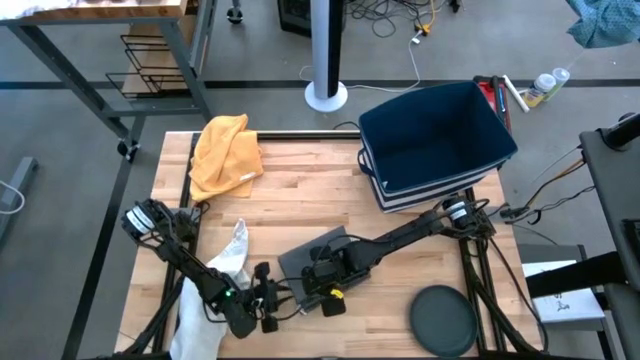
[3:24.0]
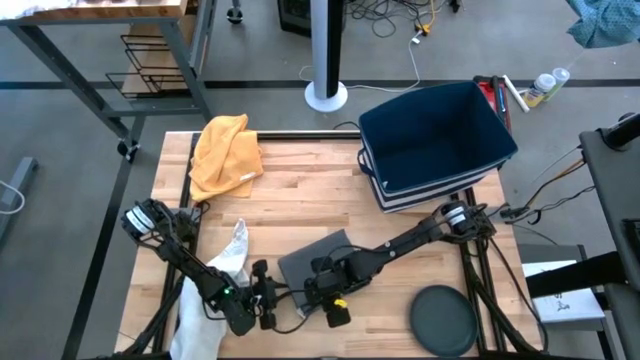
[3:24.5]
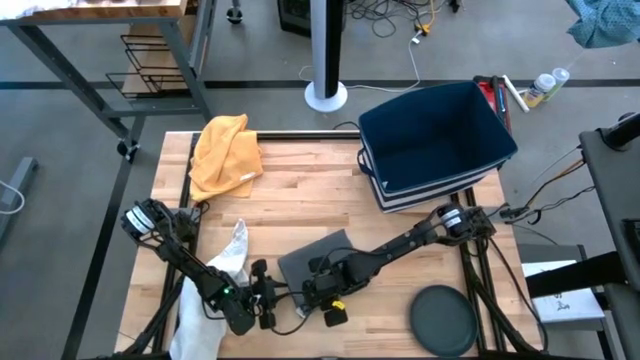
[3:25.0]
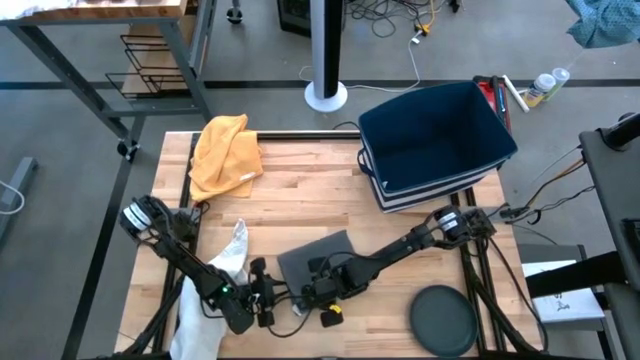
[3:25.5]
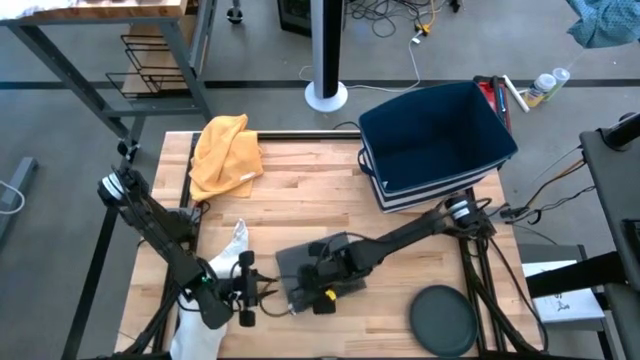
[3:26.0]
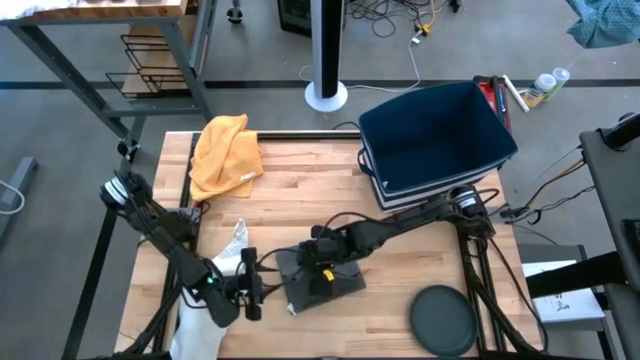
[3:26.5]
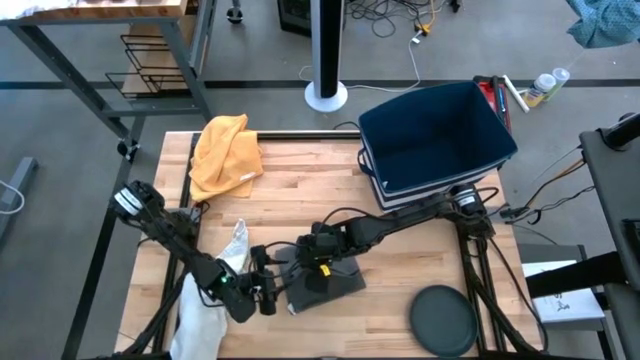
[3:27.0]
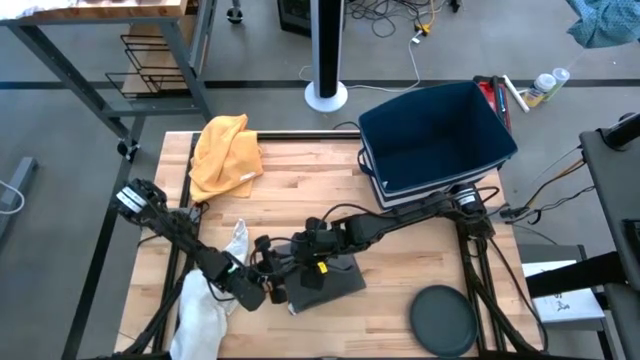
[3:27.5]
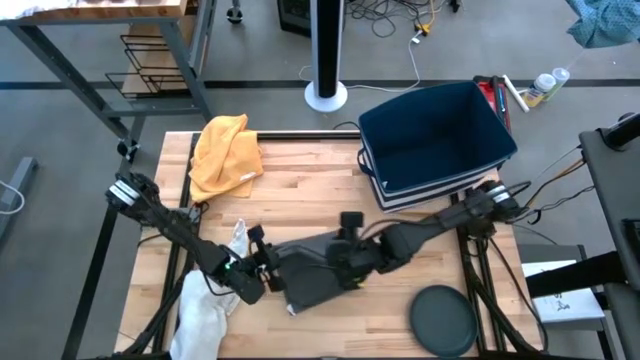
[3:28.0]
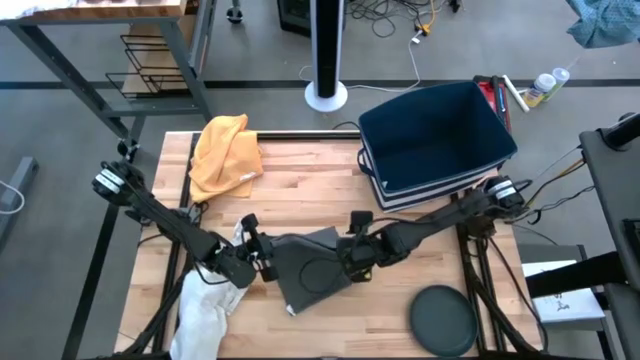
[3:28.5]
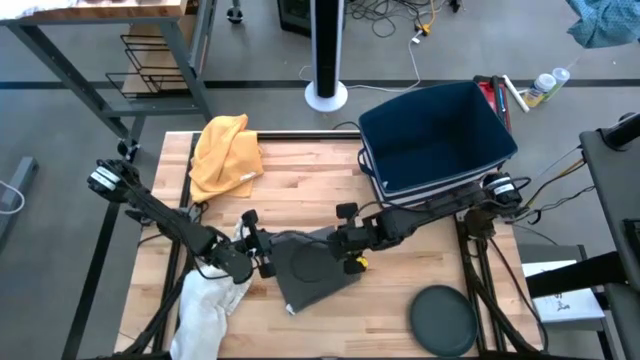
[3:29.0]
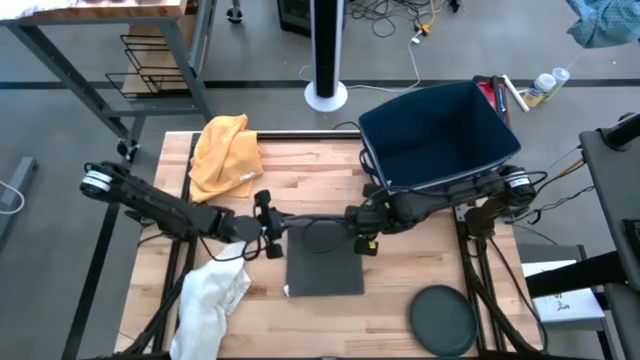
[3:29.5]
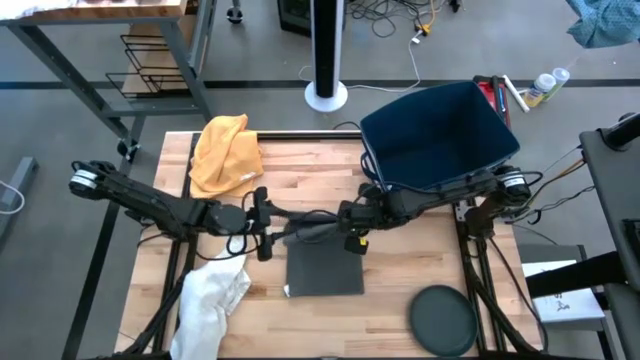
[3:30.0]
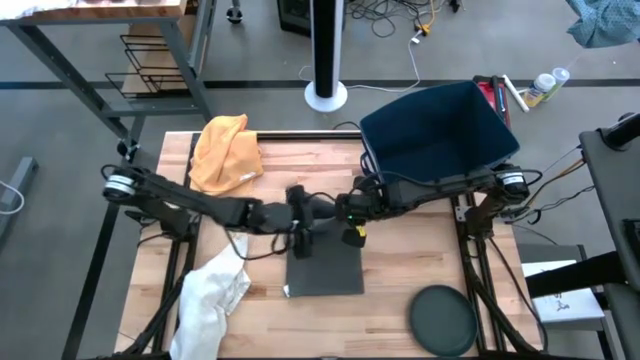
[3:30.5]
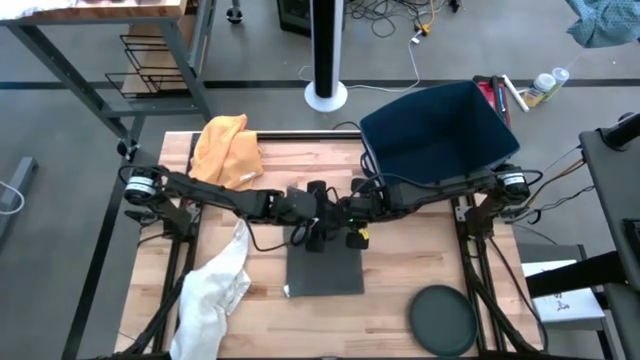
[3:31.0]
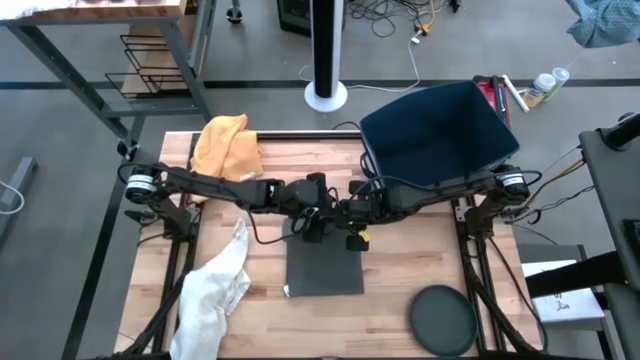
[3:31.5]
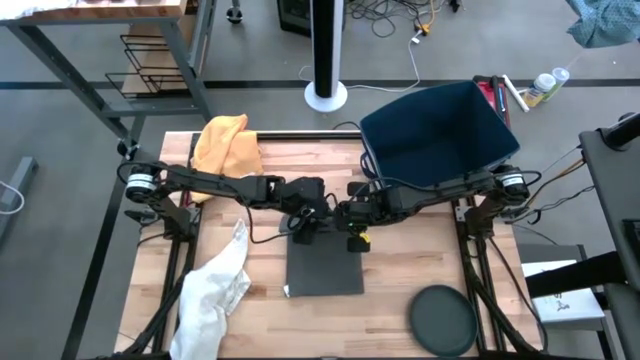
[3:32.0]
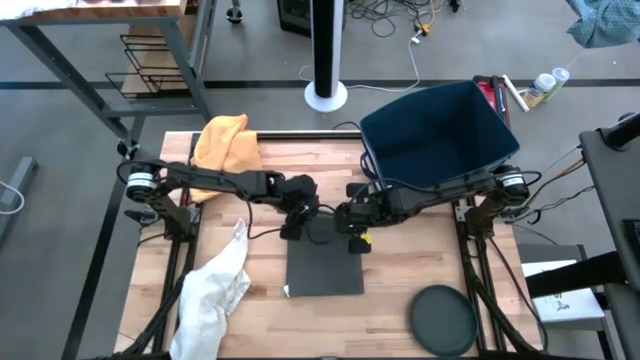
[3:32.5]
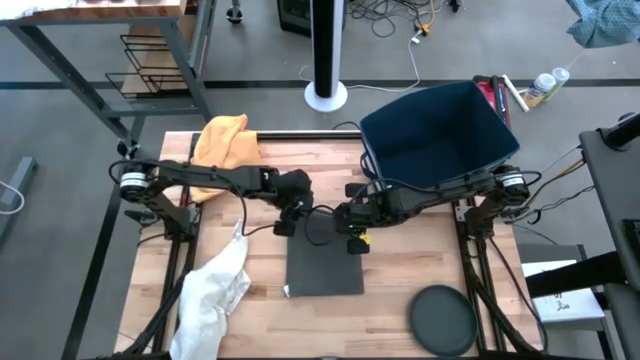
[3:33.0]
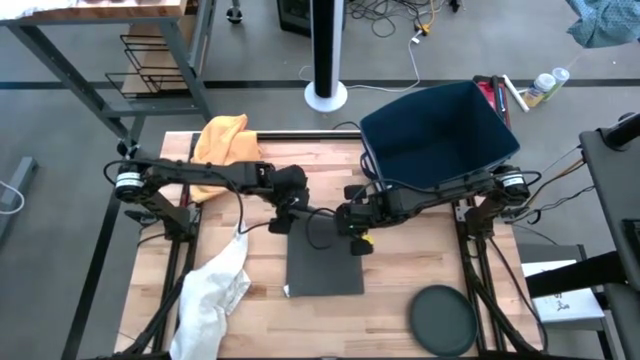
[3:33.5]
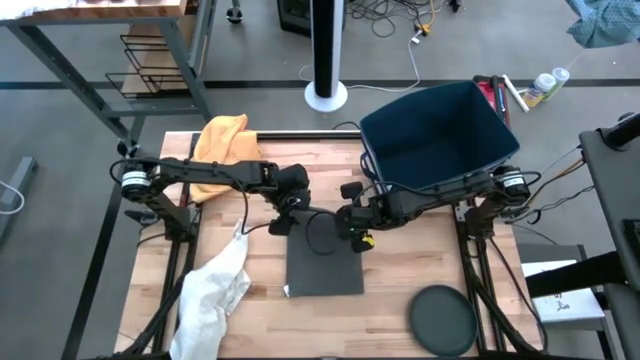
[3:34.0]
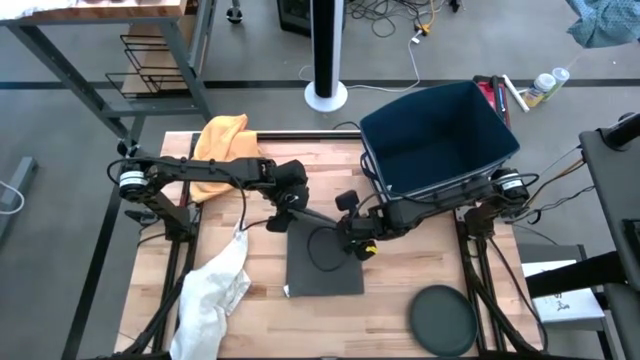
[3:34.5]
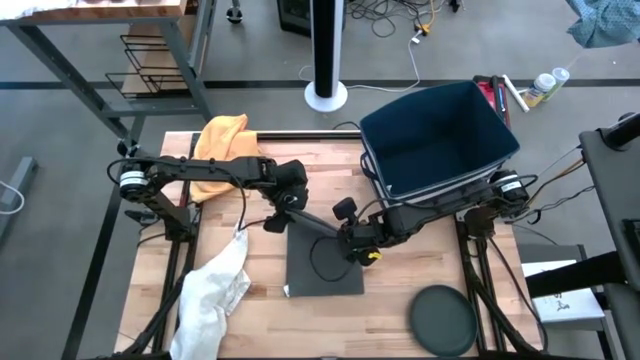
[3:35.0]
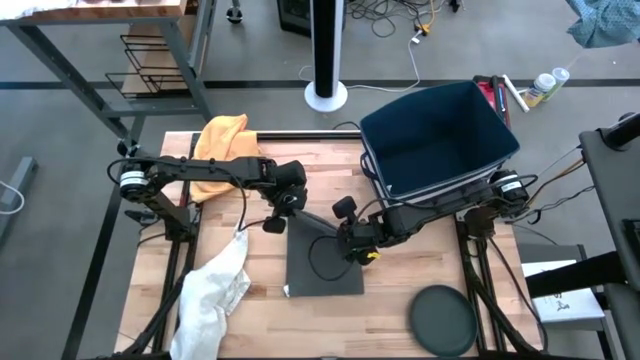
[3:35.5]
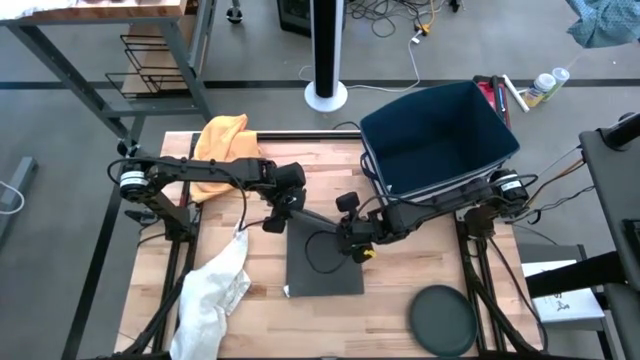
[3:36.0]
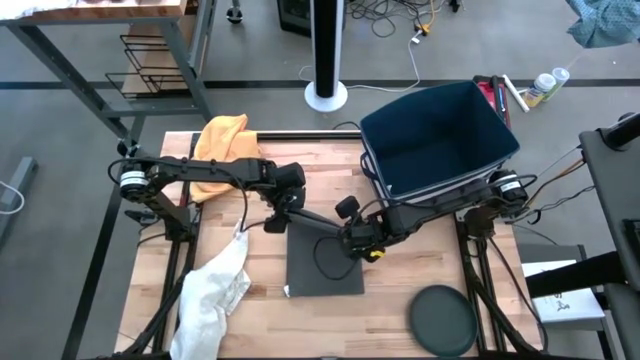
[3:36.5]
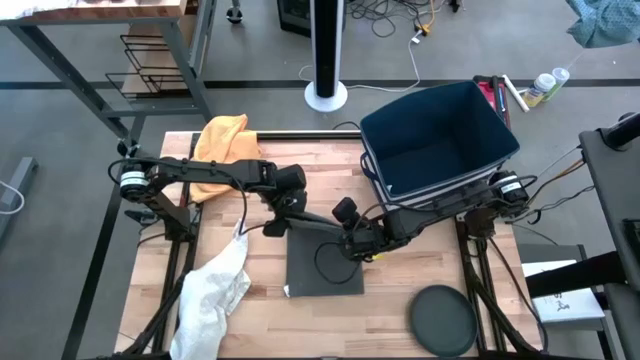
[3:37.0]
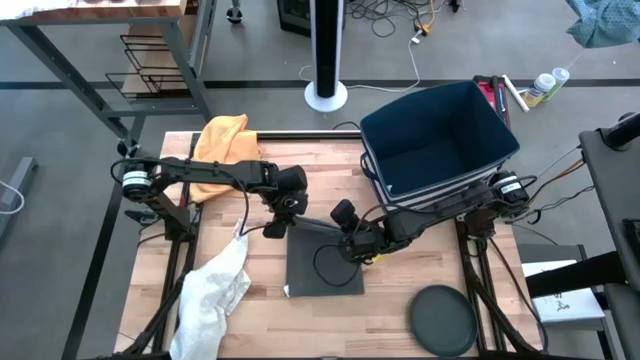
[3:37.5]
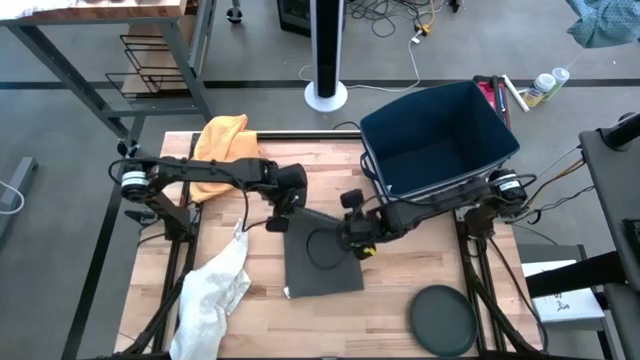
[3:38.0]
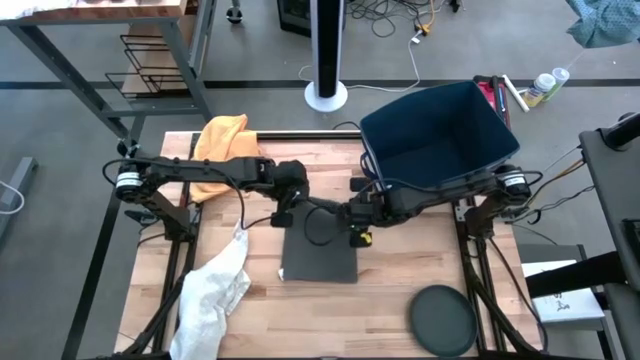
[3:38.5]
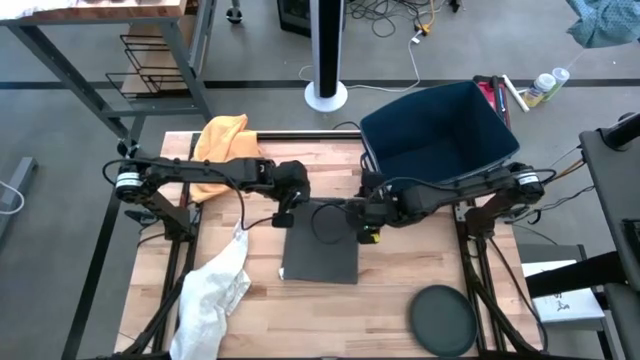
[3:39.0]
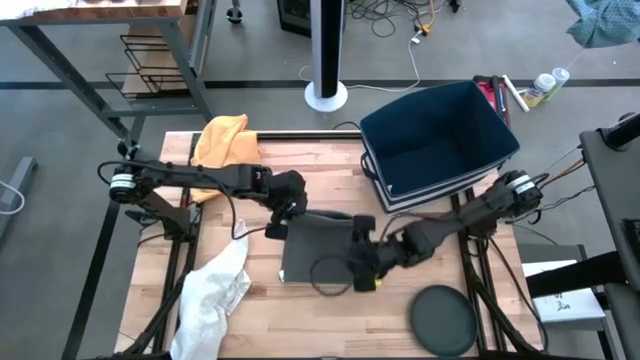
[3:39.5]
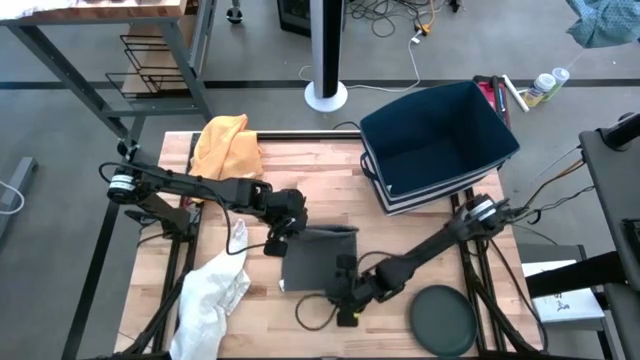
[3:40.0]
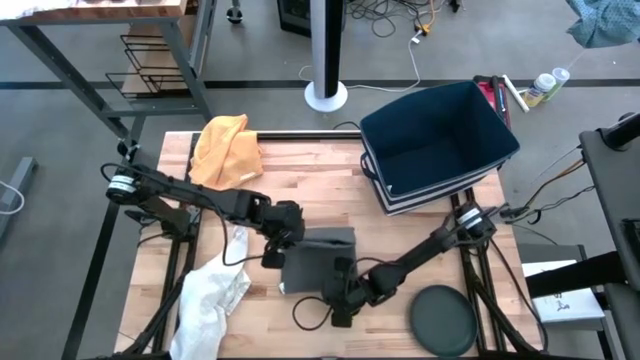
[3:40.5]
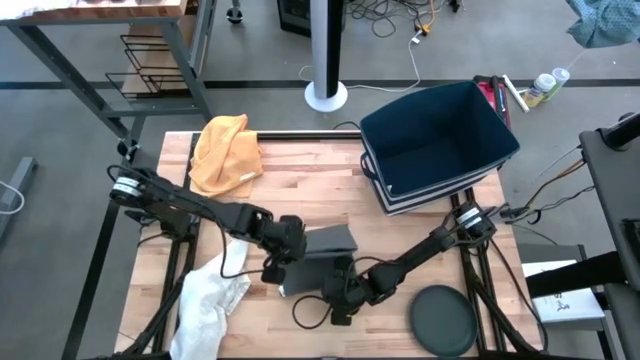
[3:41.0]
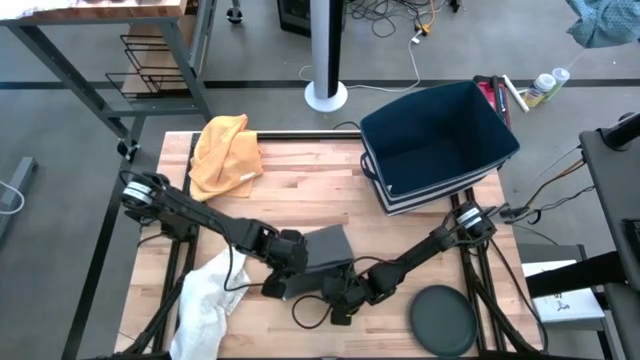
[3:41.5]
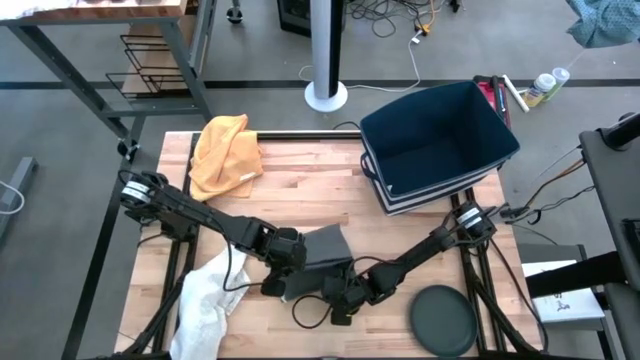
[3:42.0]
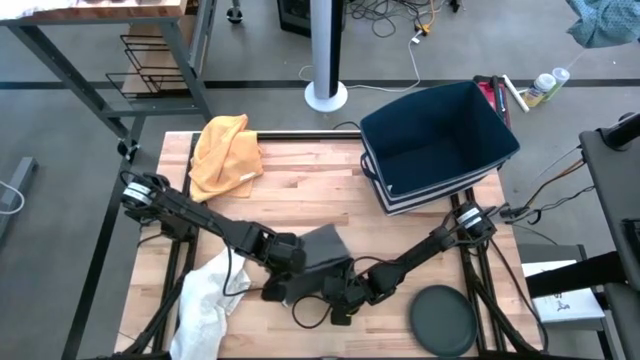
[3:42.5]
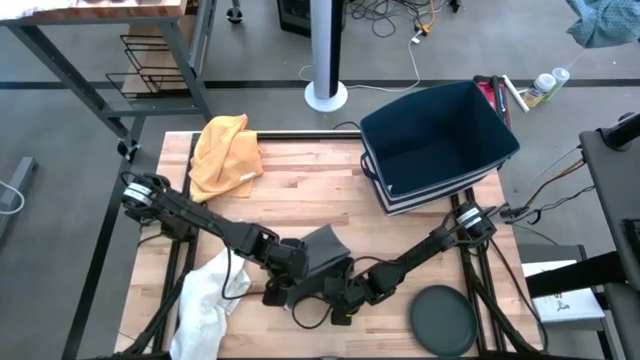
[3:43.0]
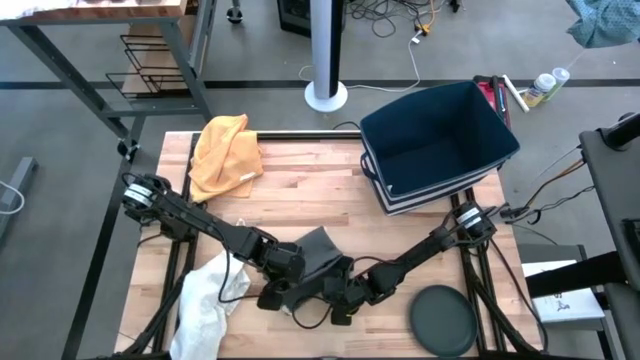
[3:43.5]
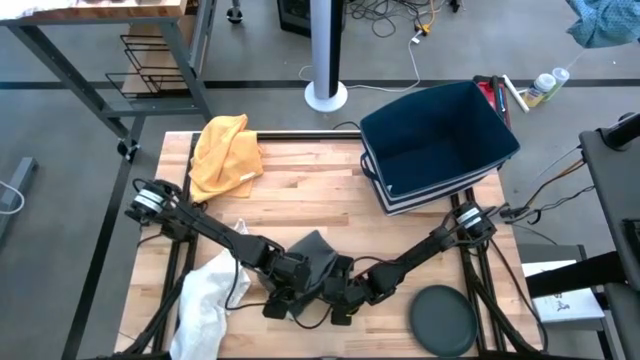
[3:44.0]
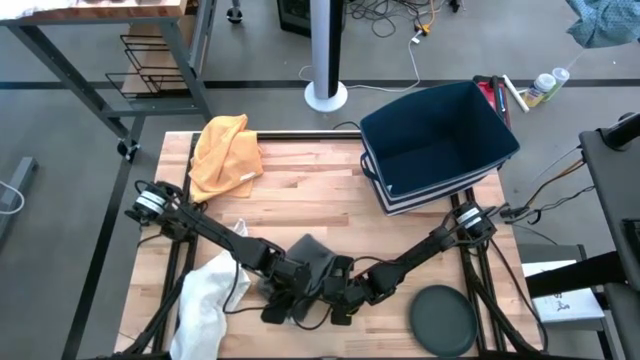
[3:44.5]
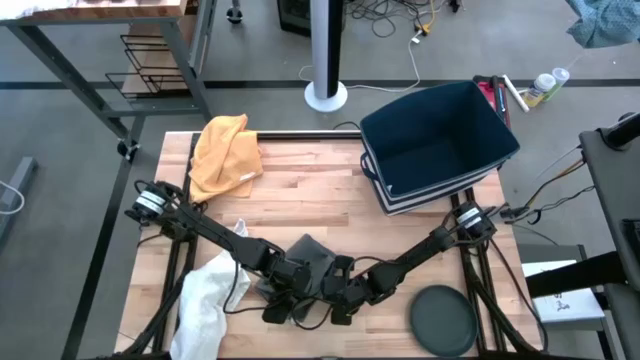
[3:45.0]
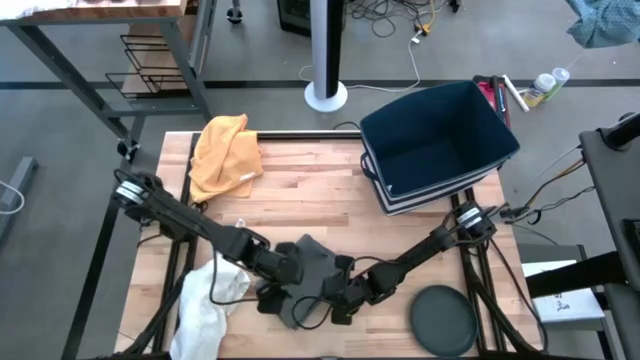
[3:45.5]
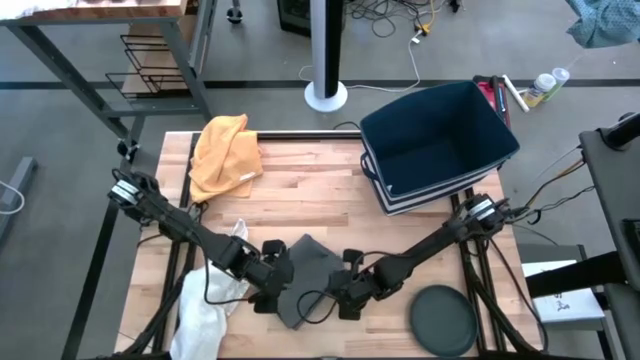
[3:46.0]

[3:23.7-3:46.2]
Task: Fold kitchen towel into neat rectangle
Fold the gray towel
